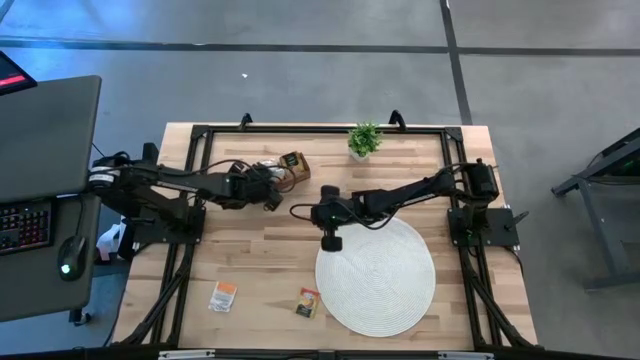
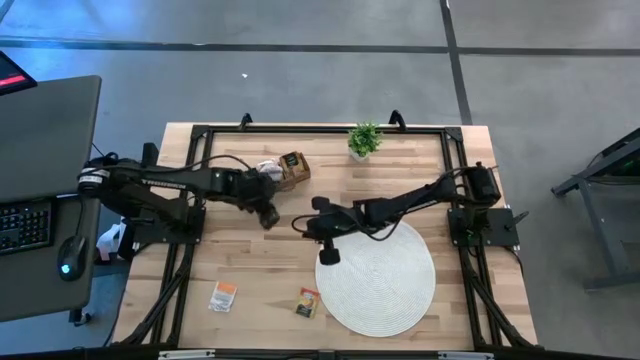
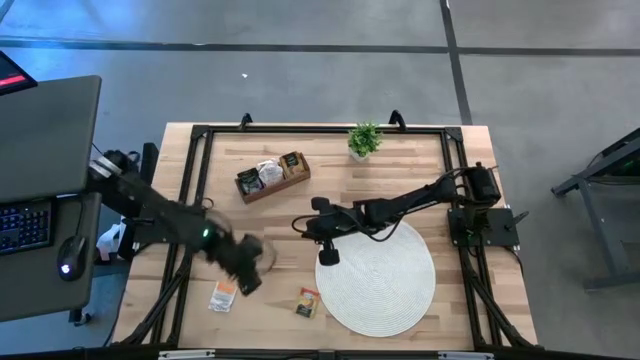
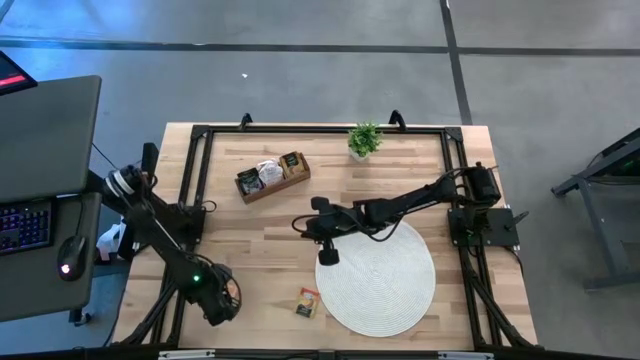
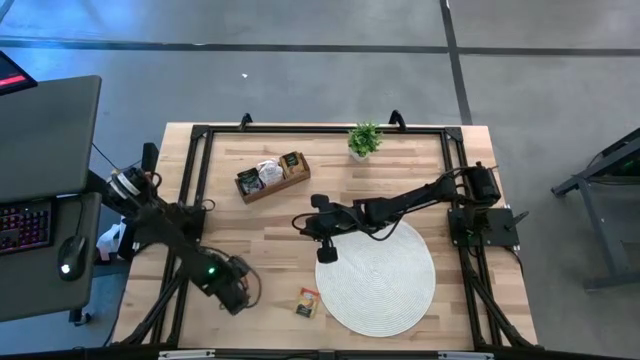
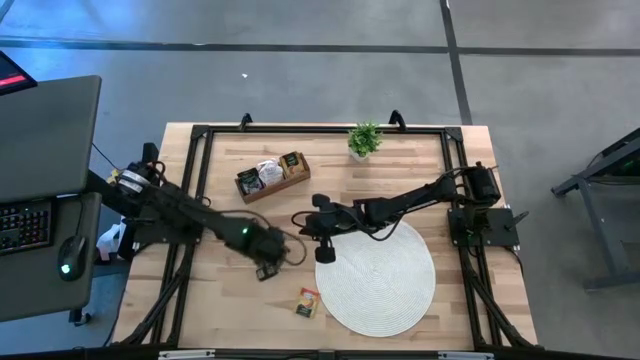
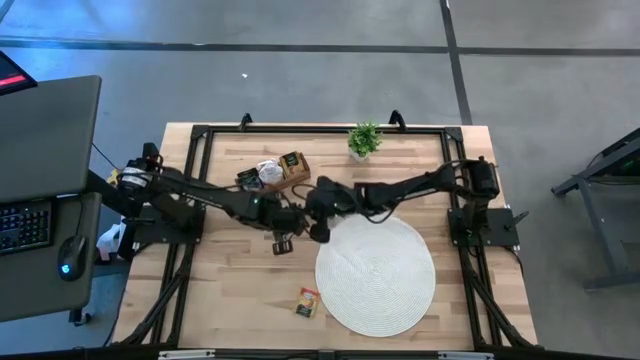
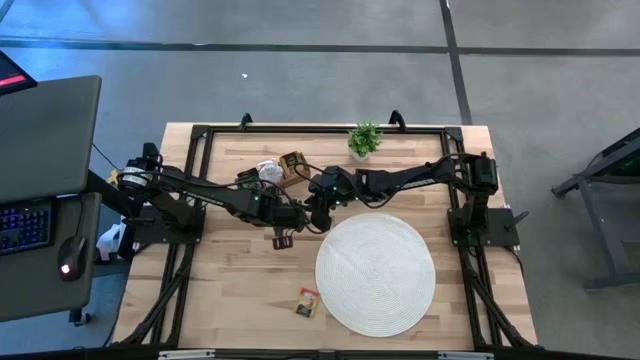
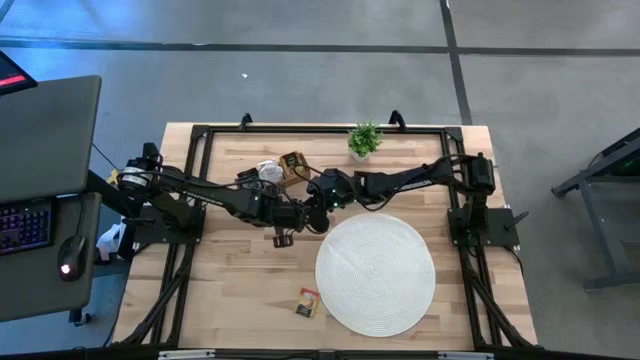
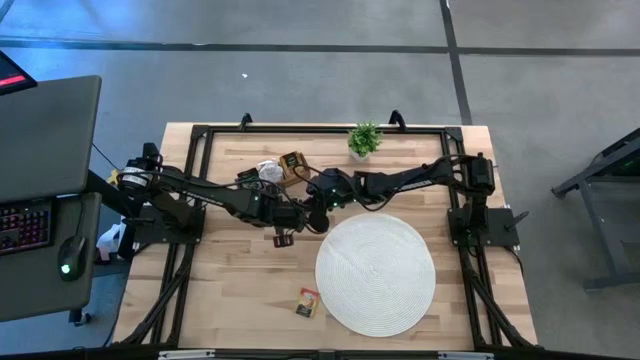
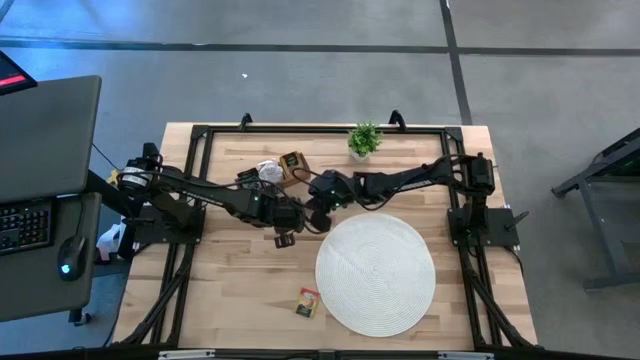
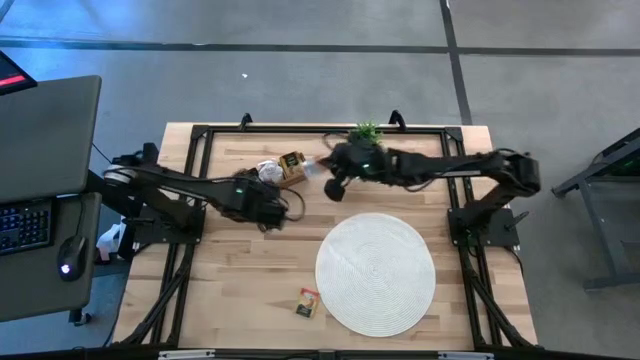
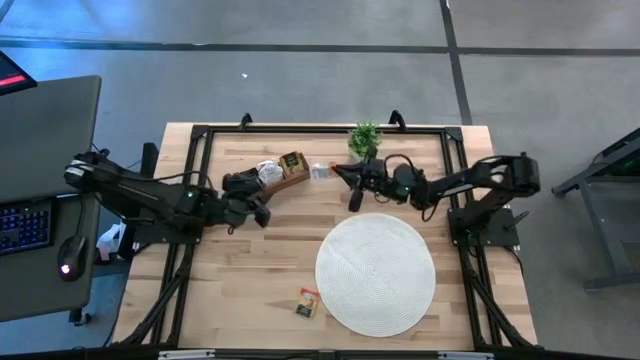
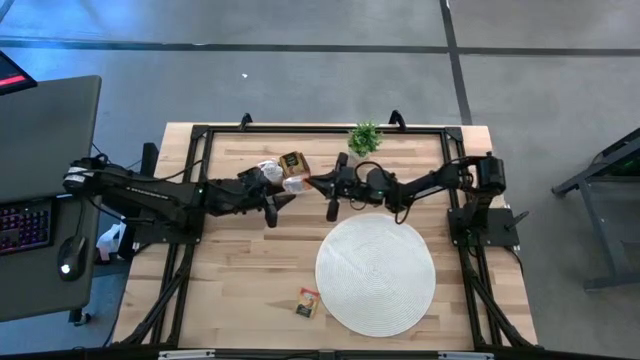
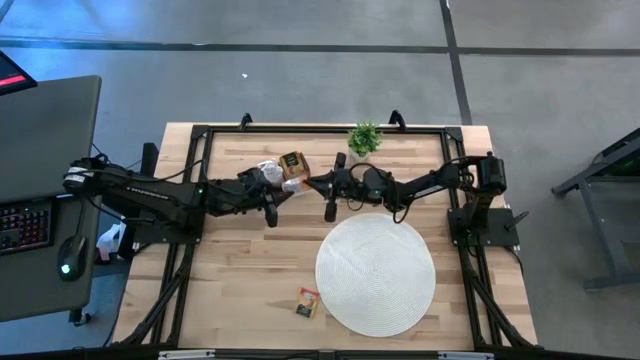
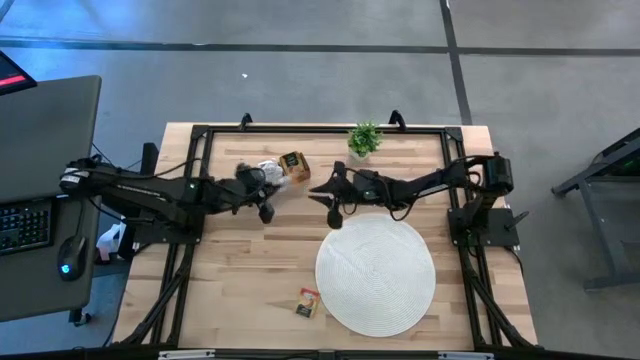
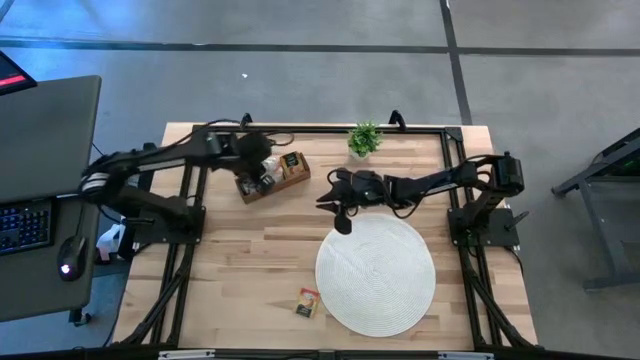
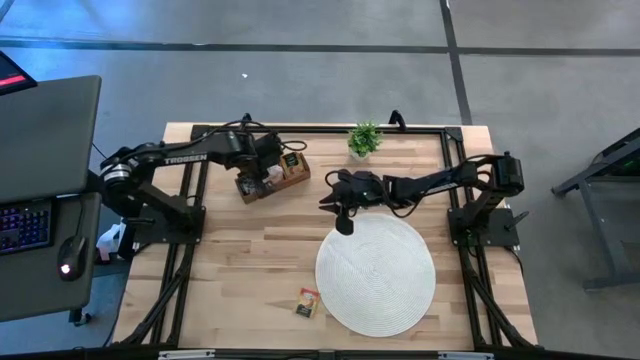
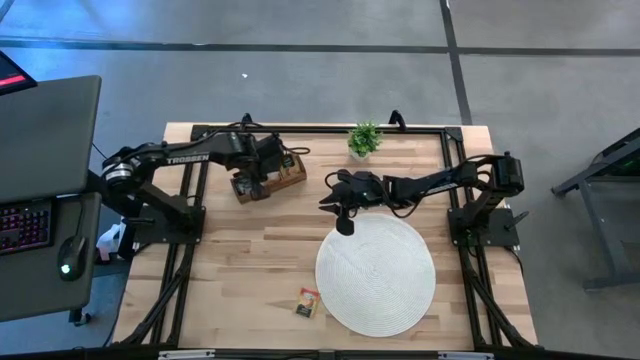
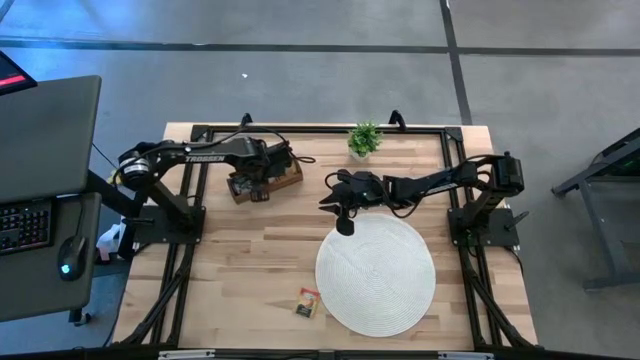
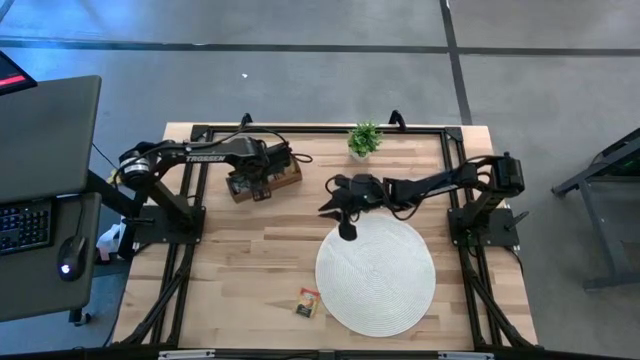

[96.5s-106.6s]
Task: Pick & Place Tea
Put the white tea bag into the middle section of the wooden organizer

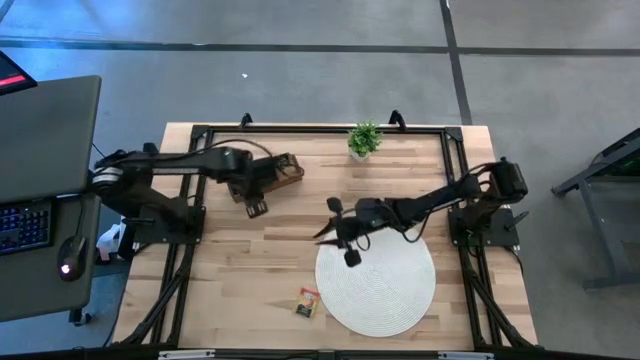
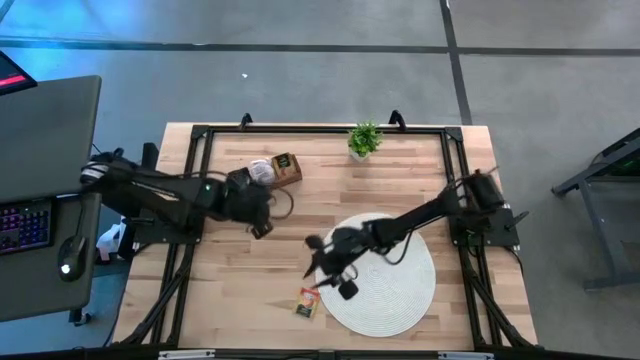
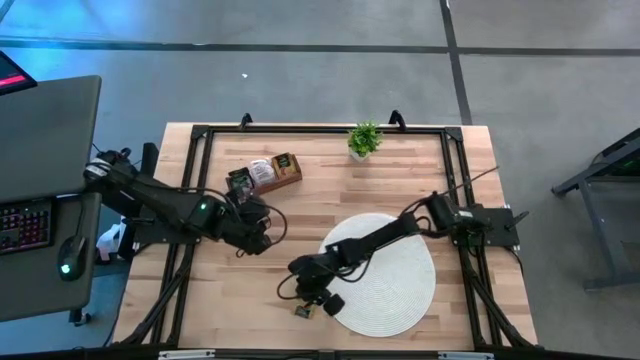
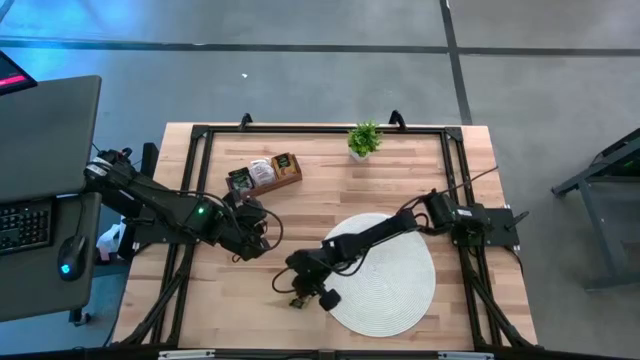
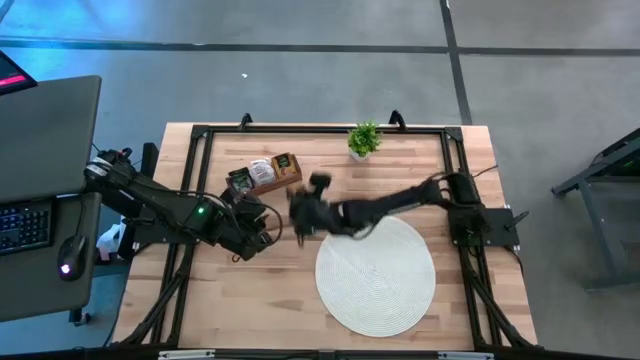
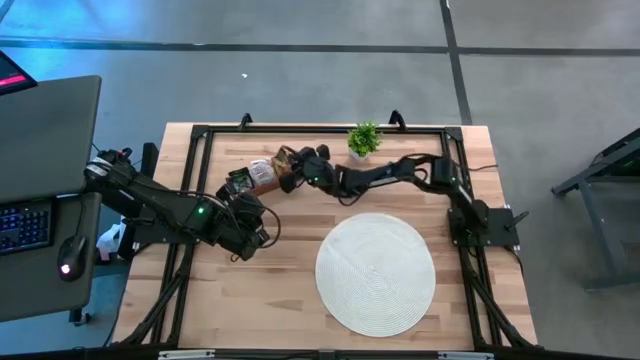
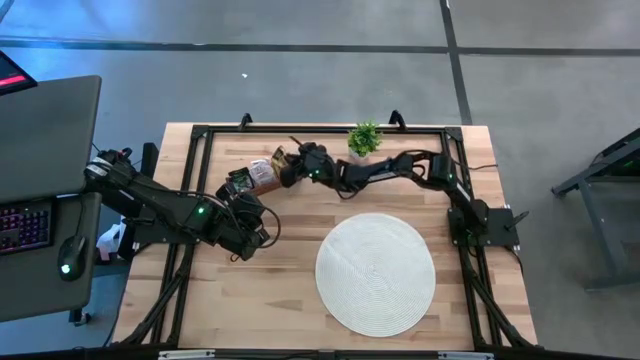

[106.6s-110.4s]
Put the orange tea bag into the right section of the wooden organizer

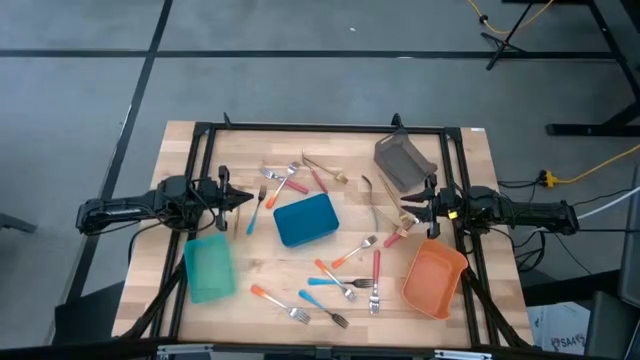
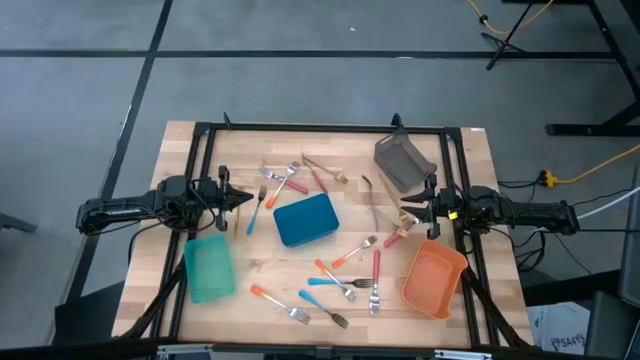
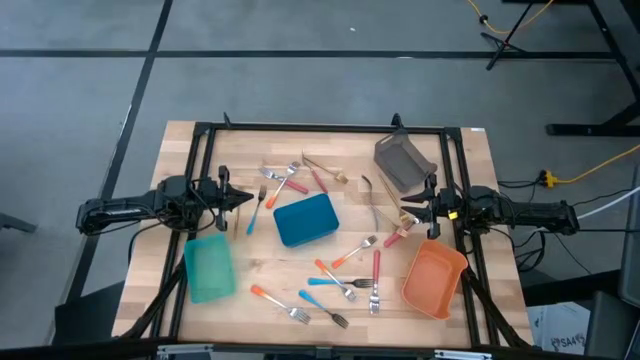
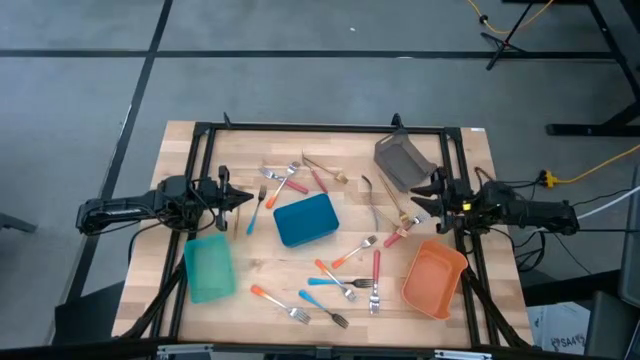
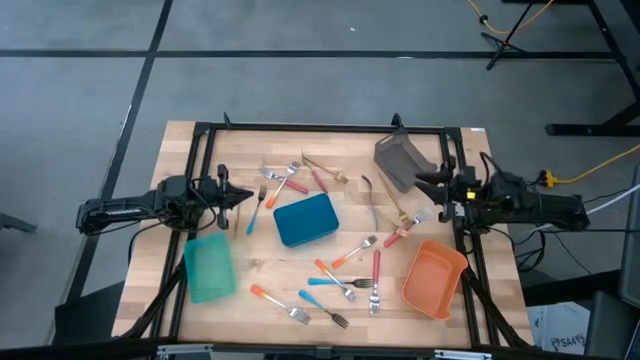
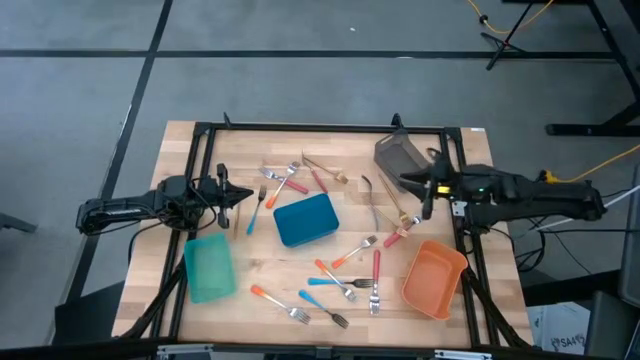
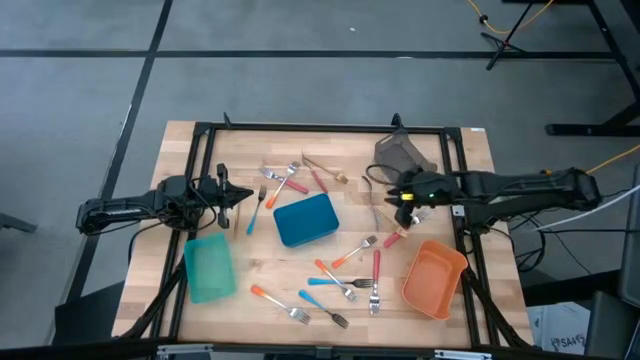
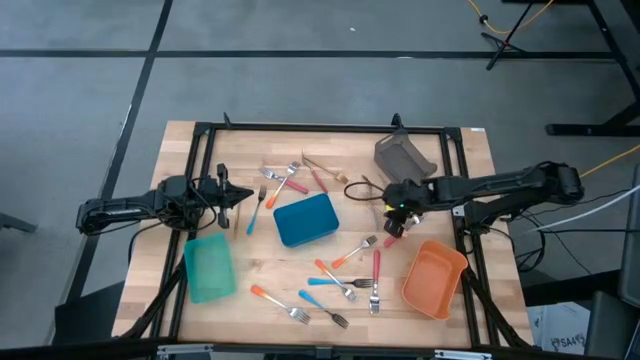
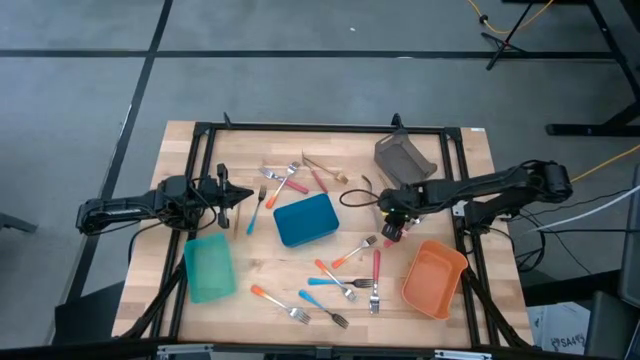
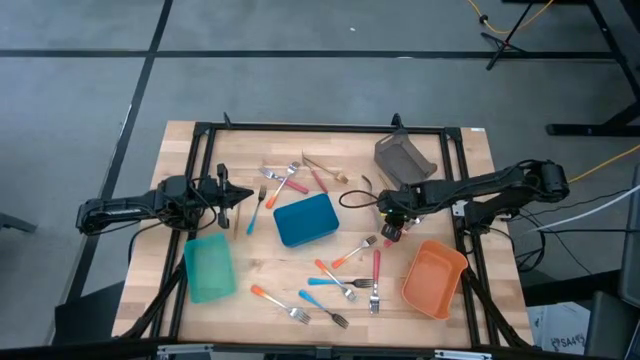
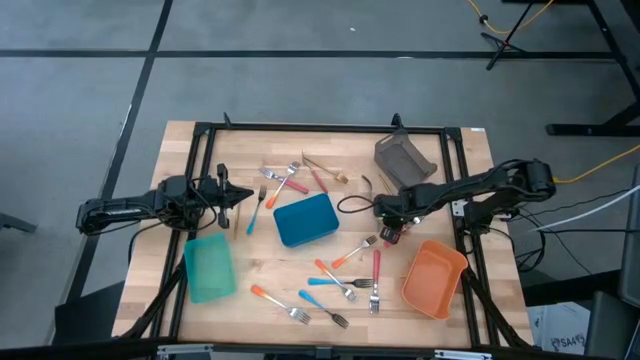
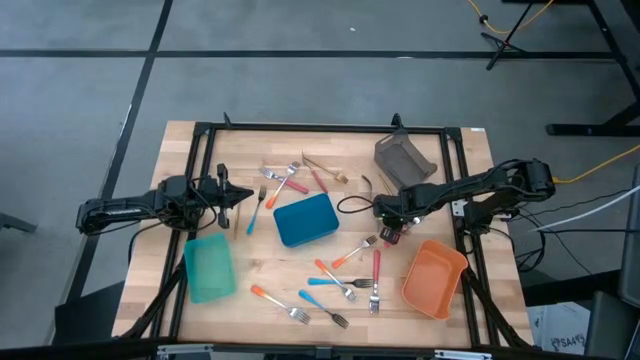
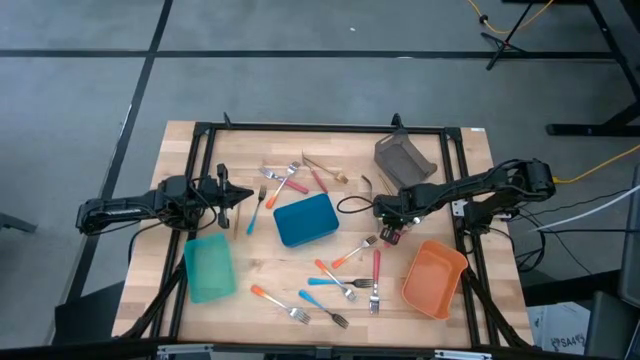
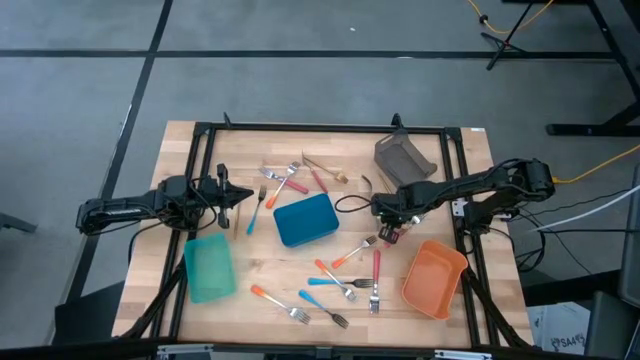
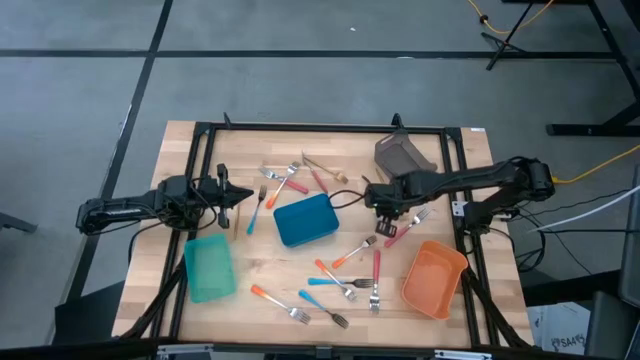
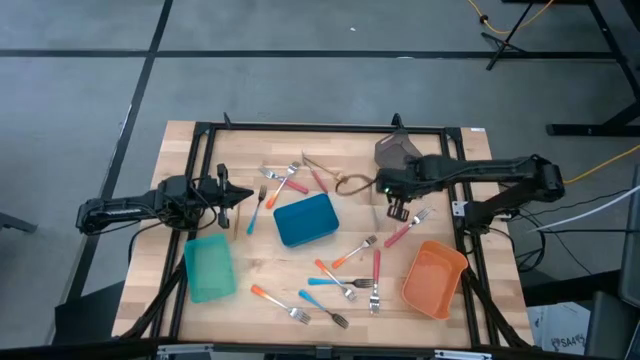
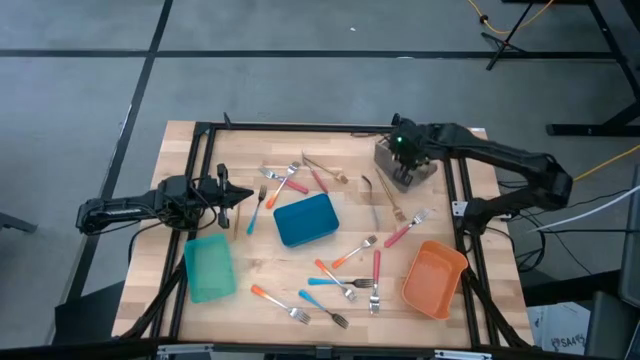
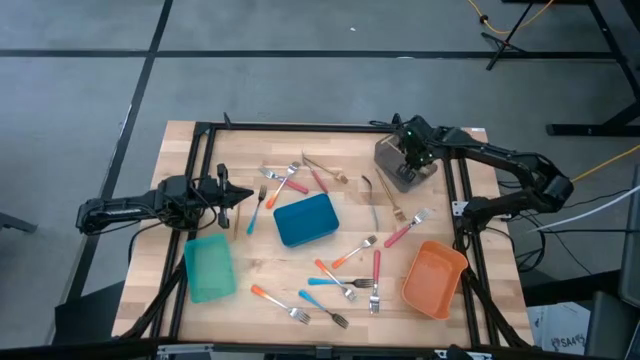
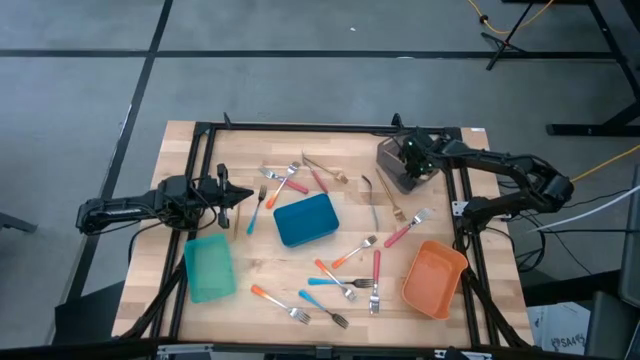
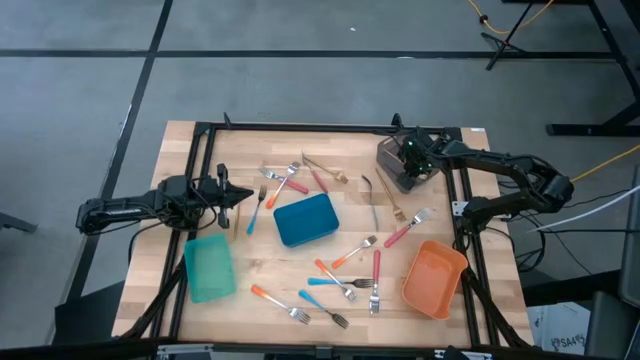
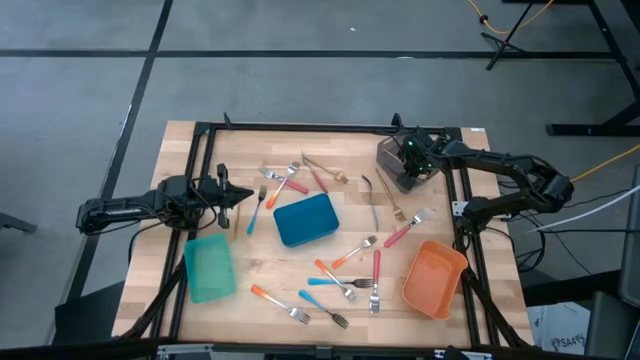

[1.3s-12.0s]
Task: Sort silverware by color (type)
Put the bottom right golden fork into the black bin
